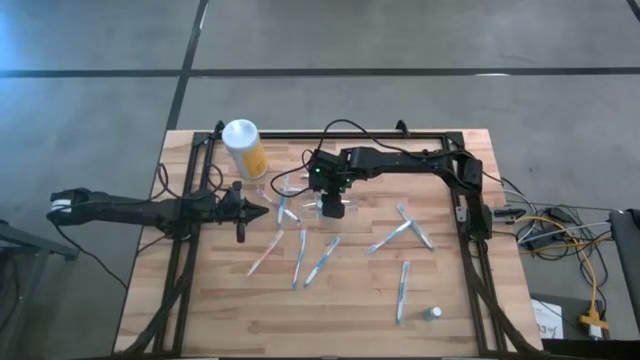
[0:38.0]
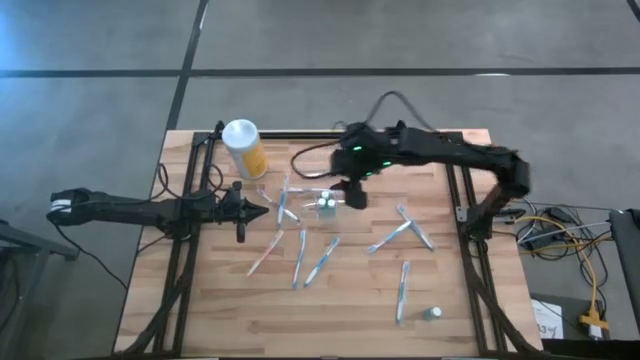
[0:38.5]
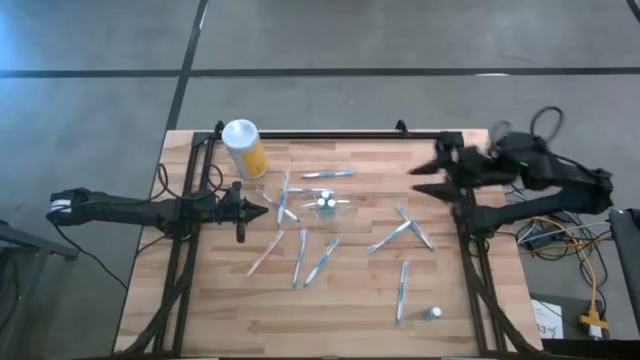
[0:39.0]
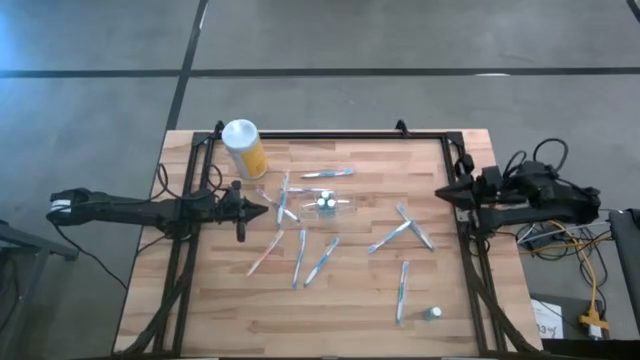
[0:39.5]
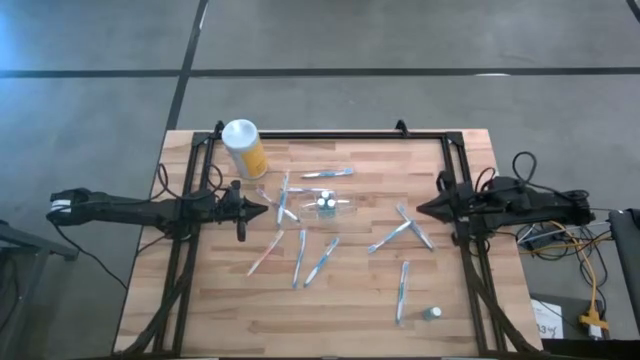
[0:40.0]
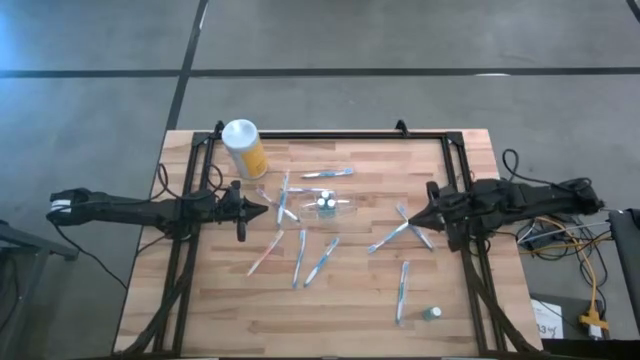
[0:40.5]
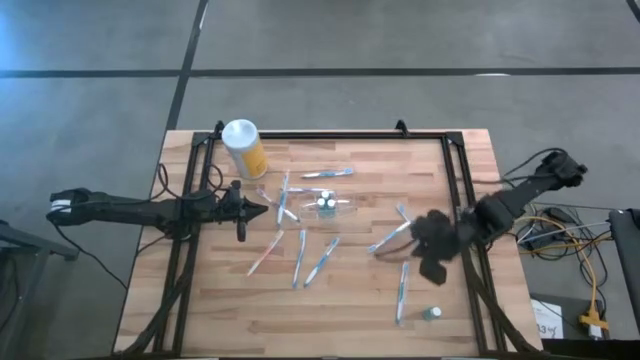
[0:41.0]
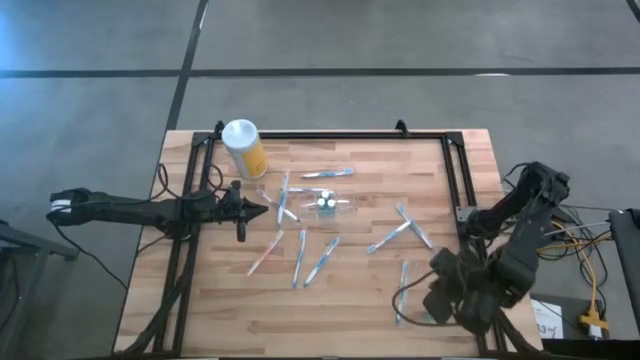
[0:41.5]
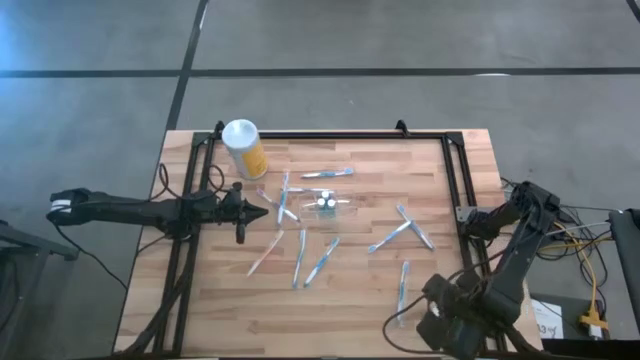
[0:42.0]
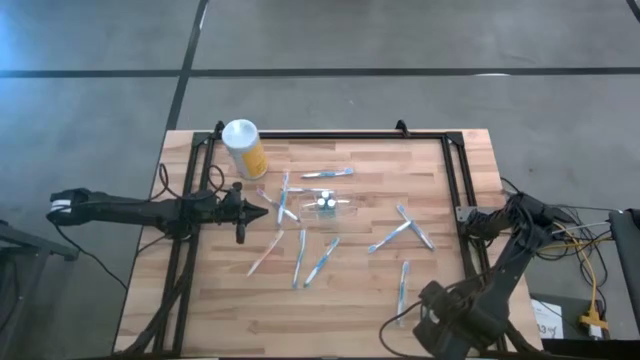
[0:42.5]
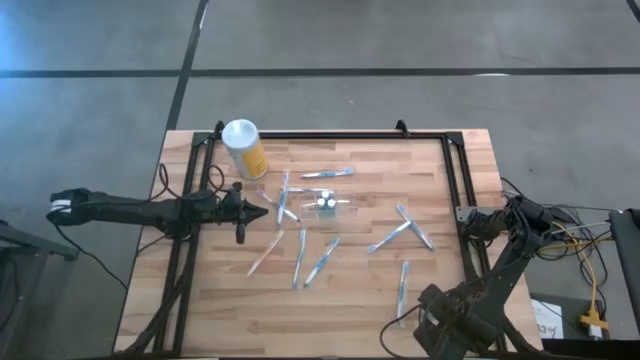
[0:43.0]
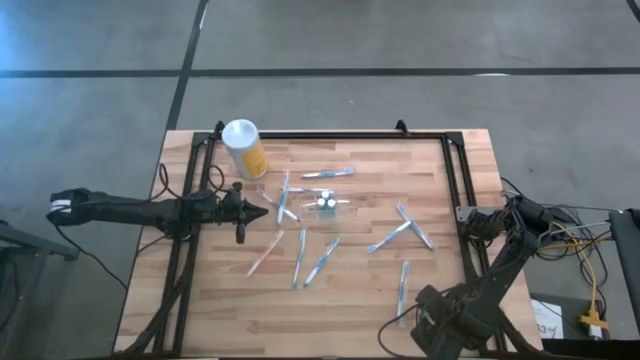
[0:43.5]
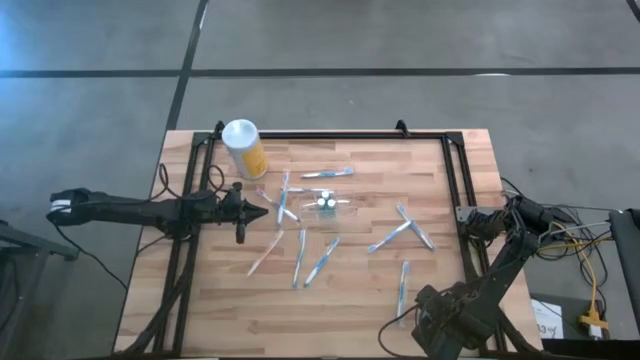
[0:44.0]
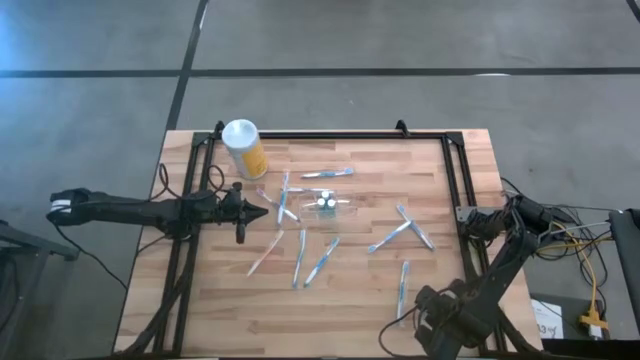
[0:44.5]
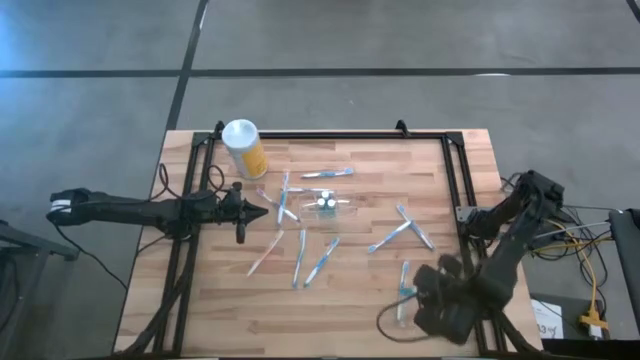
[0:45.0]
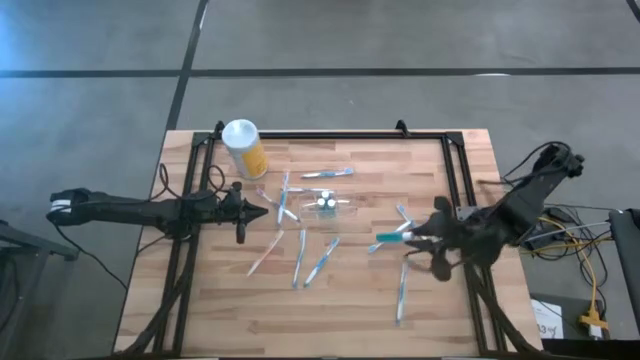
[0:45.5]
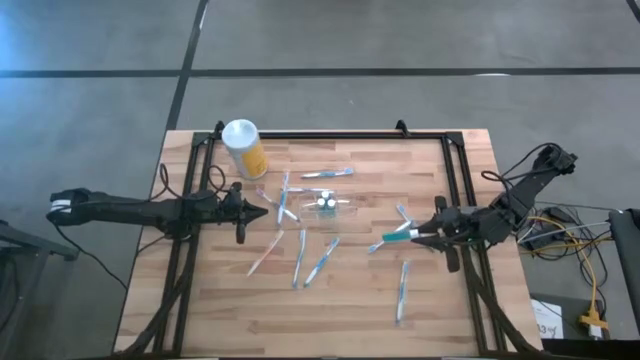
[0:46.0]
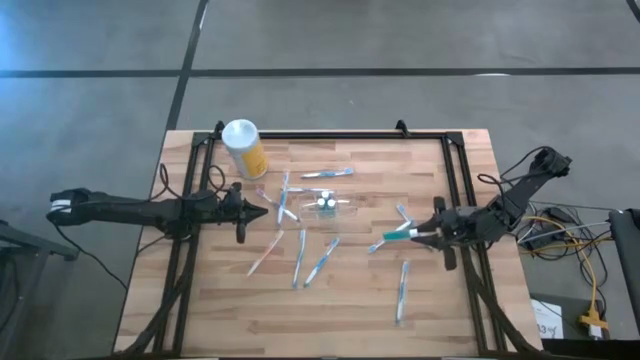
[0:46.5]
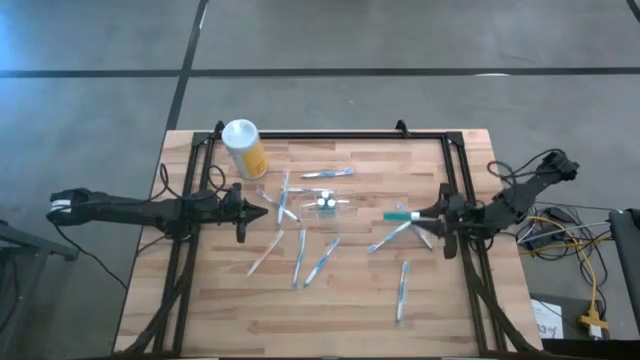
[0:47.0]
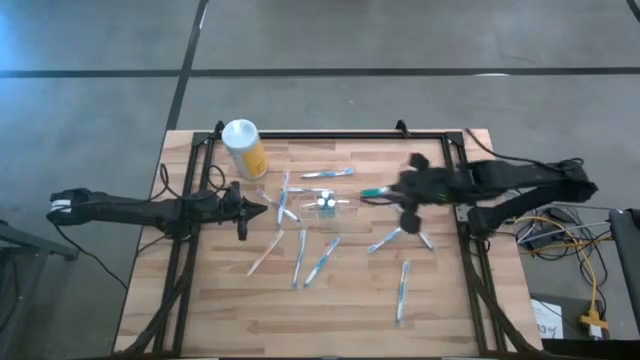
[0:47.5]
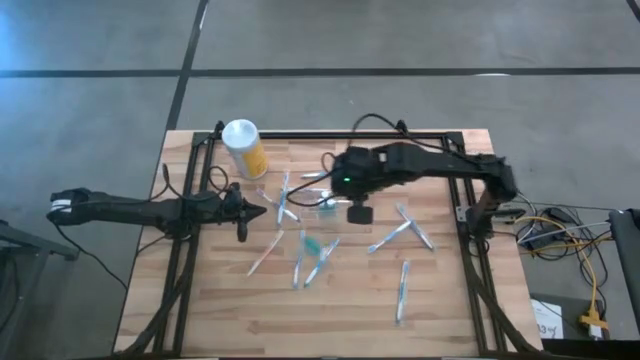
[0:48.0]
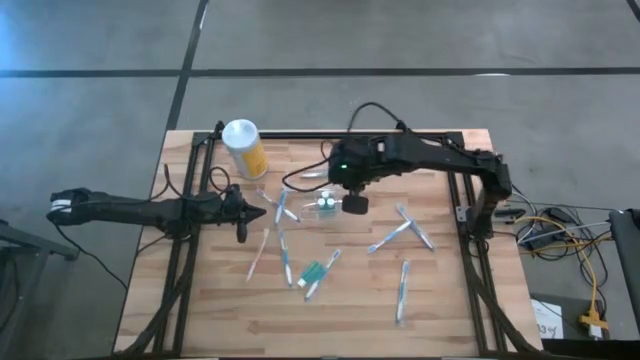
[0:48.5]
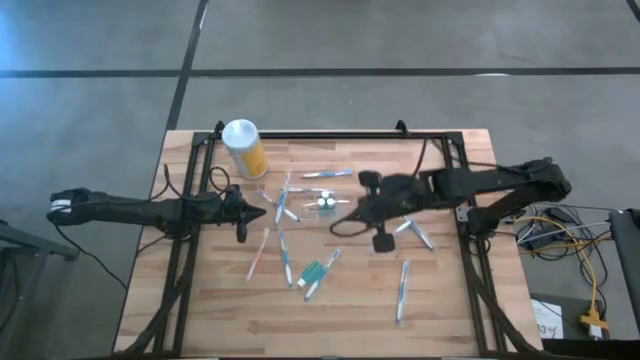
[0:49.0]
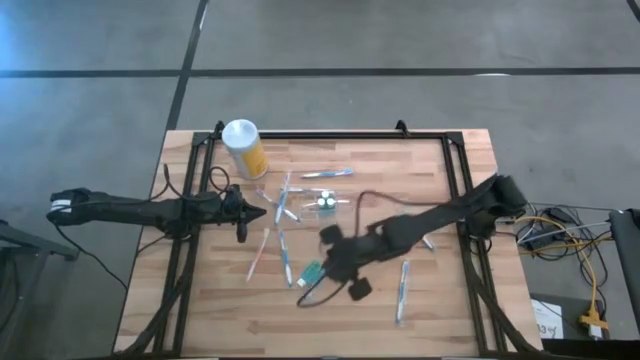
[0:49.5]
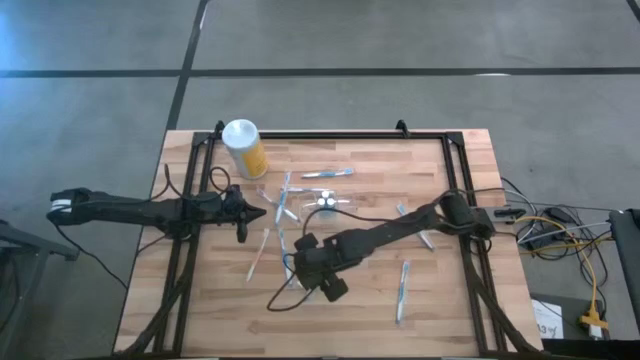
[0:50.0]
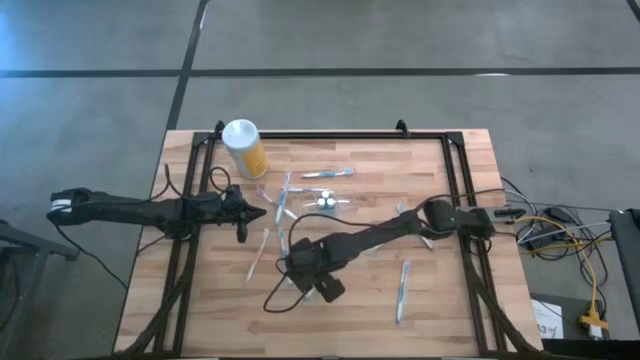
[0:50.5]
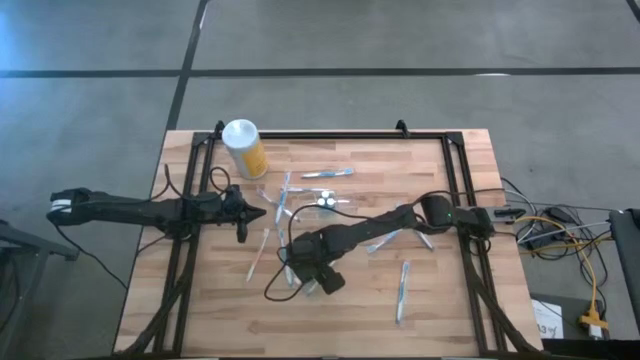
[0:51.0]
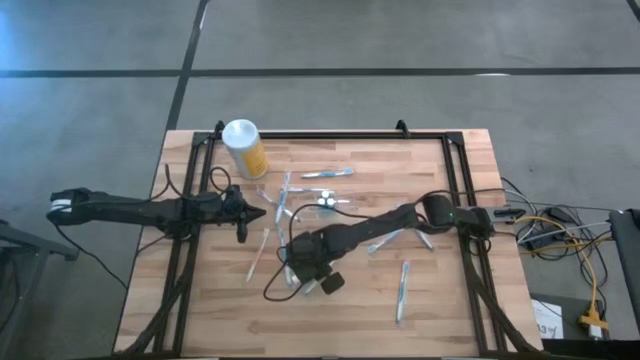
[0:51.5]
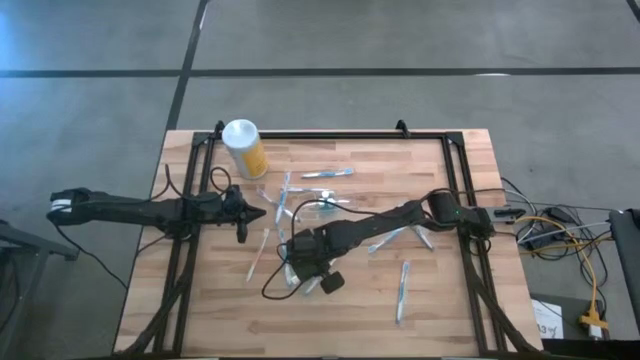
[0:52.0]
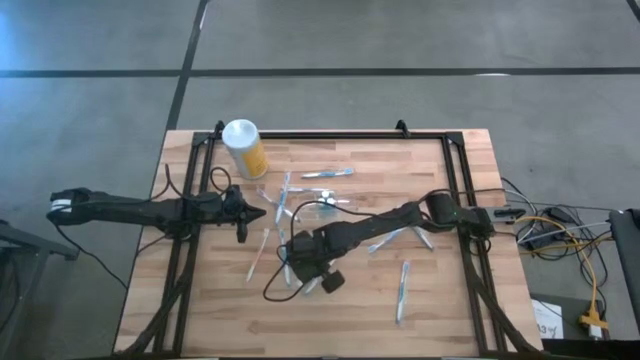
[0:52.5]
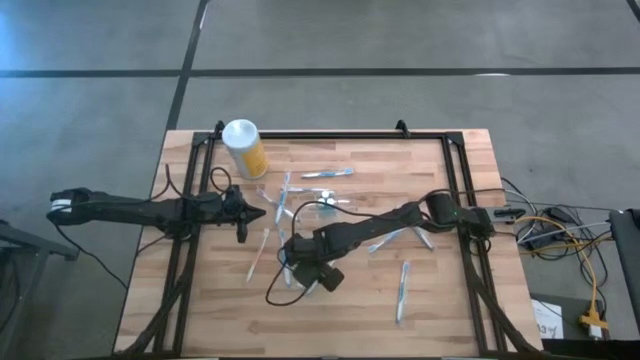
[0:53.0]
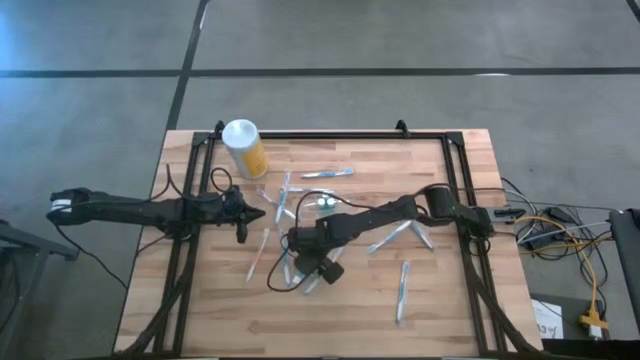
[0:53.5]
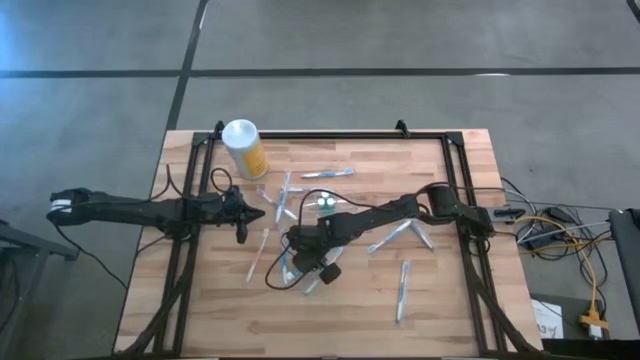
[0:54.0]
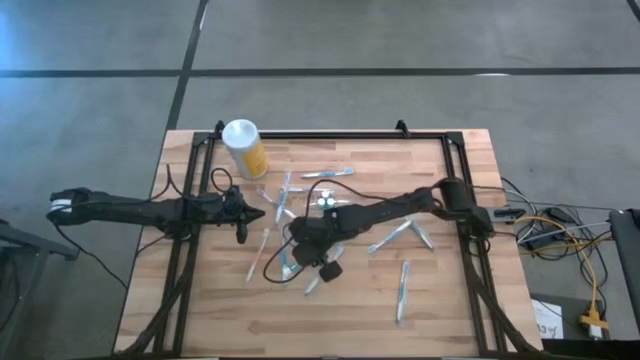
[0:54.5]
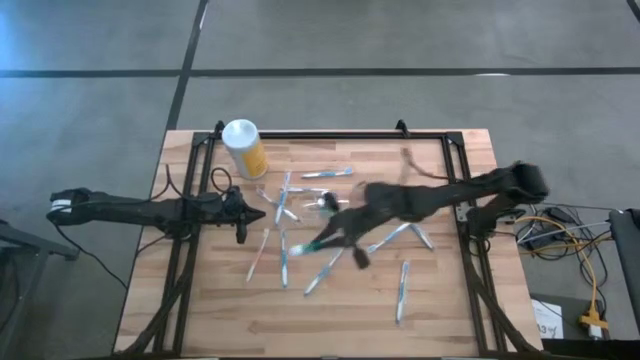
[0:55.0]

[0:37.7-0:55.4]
Task: Pick & Place toothbrushing station
Put the mouthwash into the middle section of the transparent organizer
